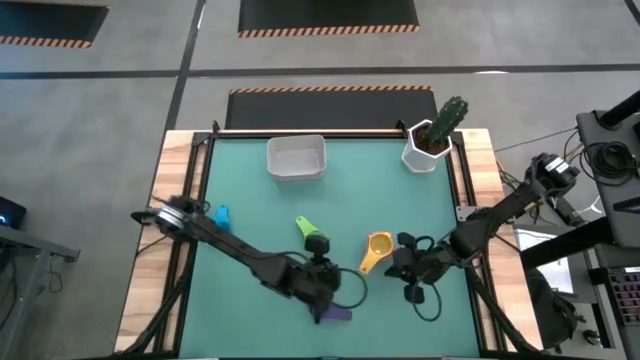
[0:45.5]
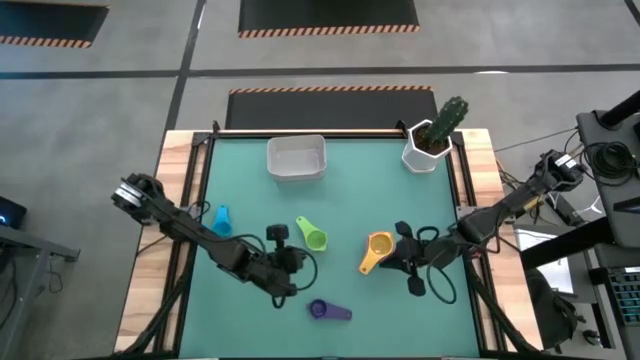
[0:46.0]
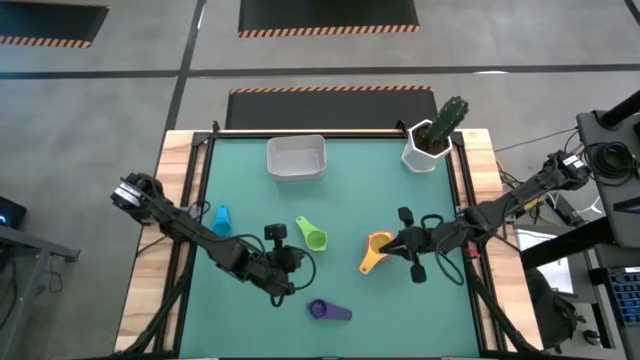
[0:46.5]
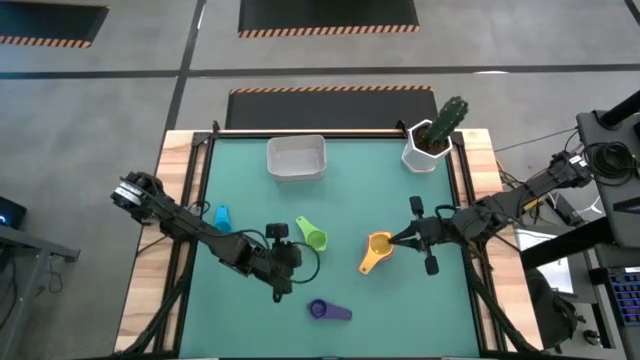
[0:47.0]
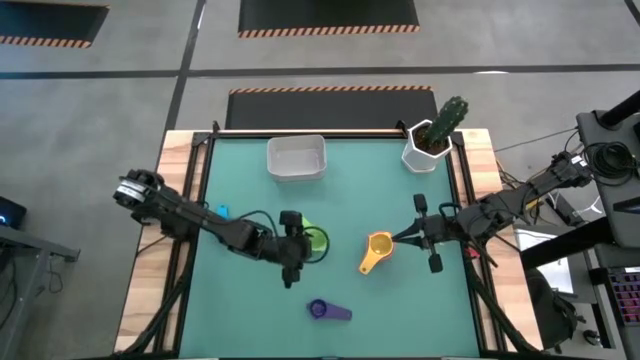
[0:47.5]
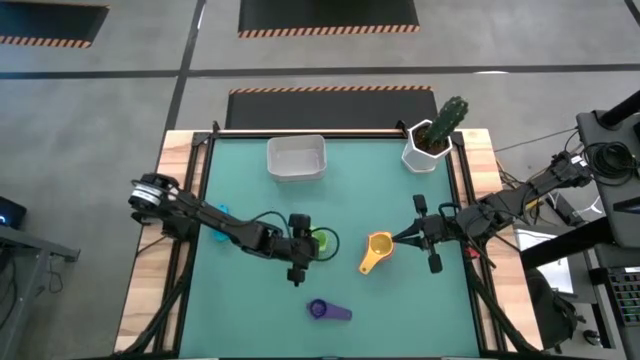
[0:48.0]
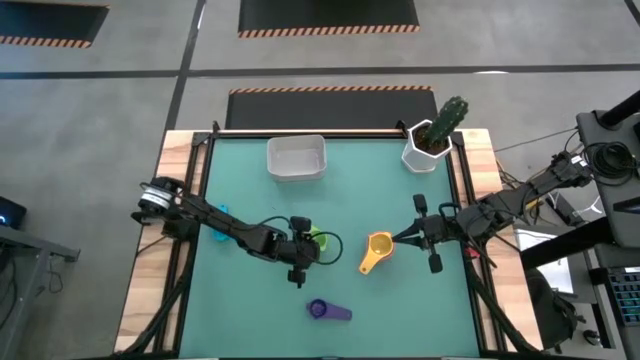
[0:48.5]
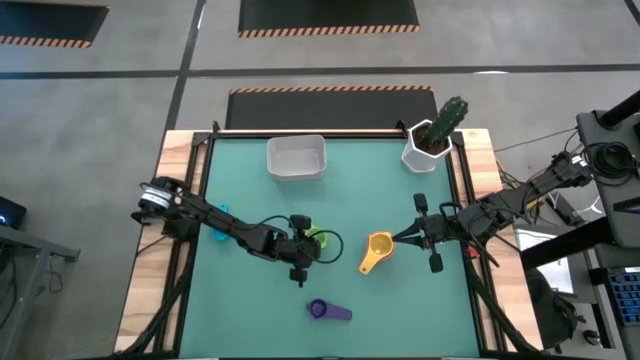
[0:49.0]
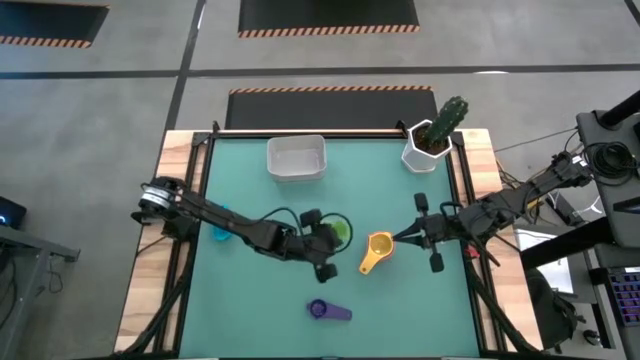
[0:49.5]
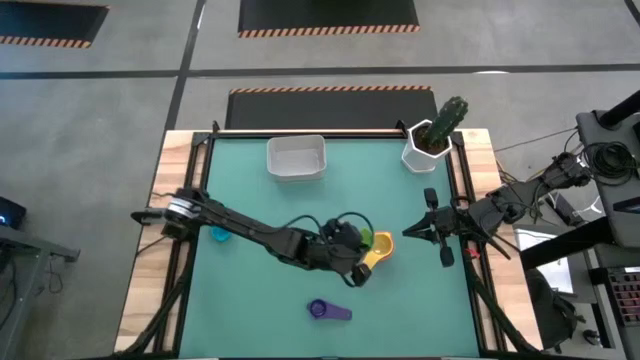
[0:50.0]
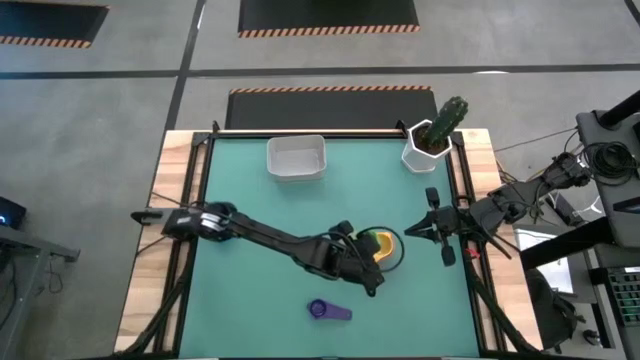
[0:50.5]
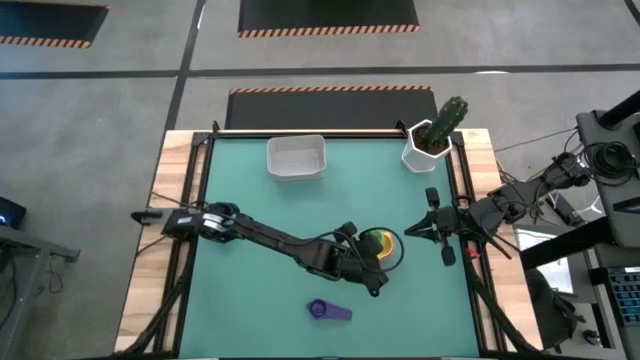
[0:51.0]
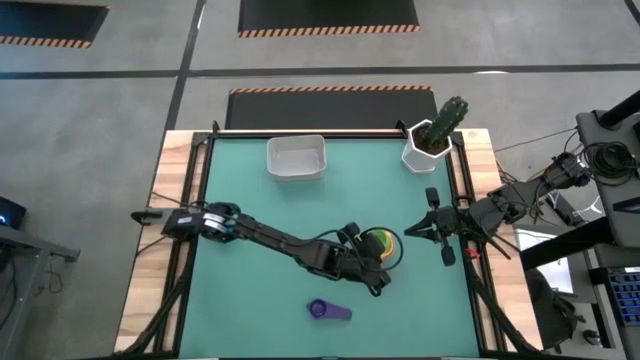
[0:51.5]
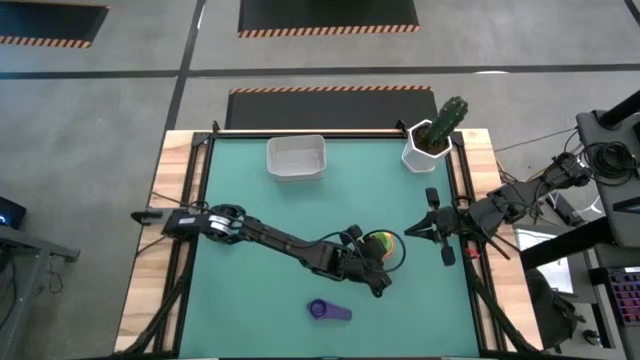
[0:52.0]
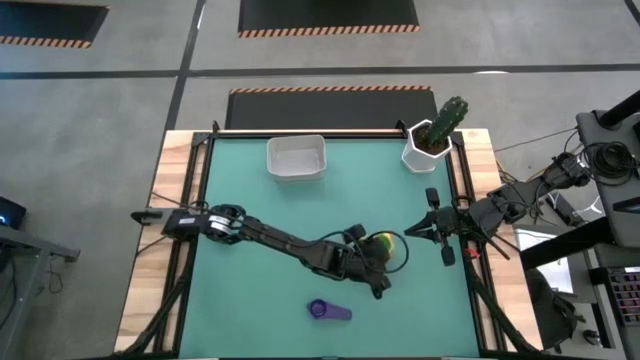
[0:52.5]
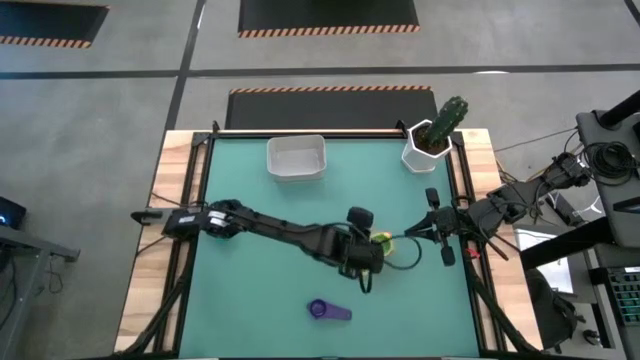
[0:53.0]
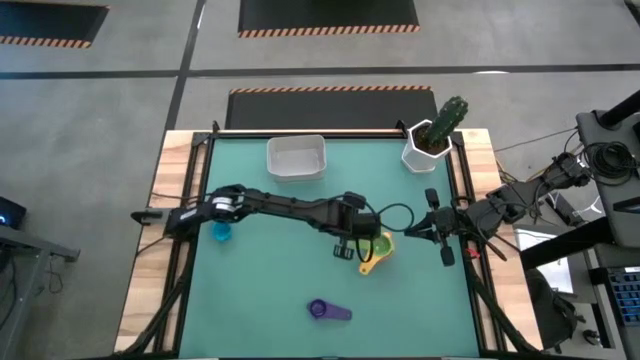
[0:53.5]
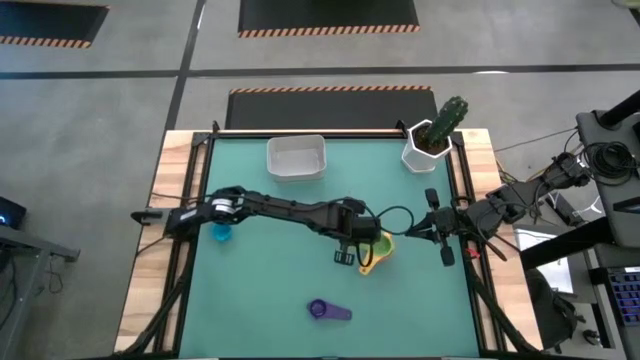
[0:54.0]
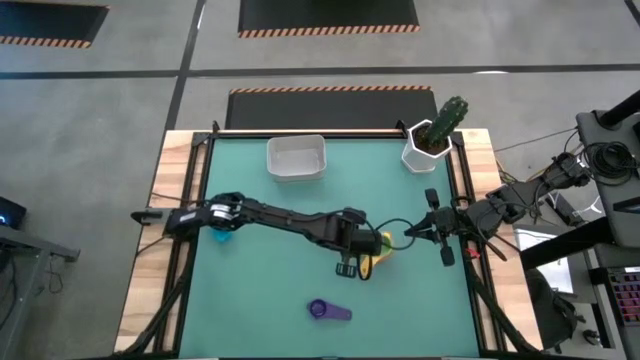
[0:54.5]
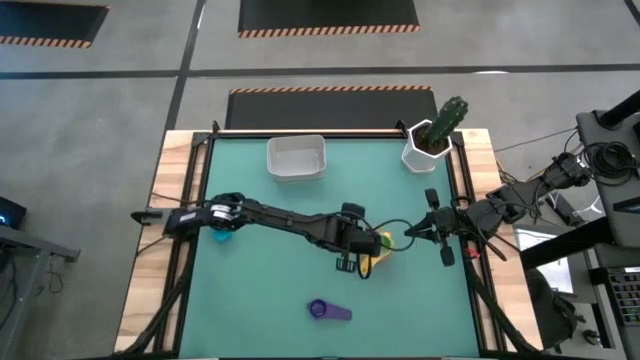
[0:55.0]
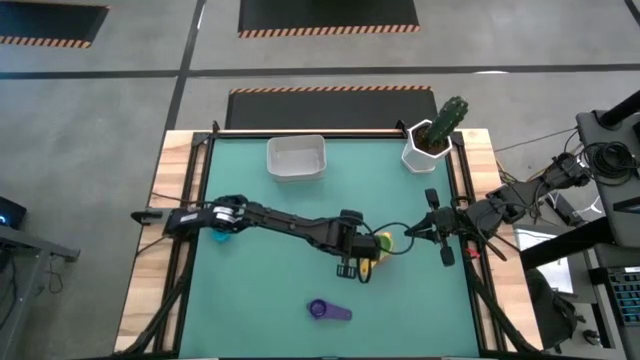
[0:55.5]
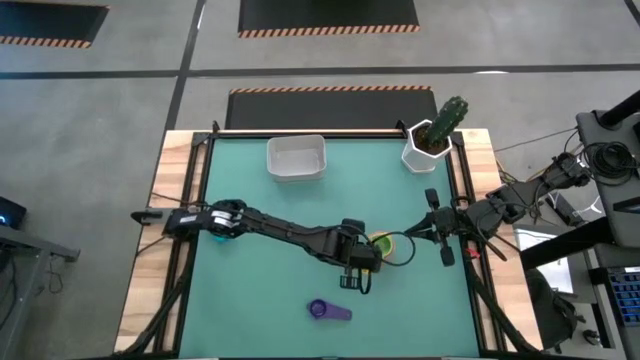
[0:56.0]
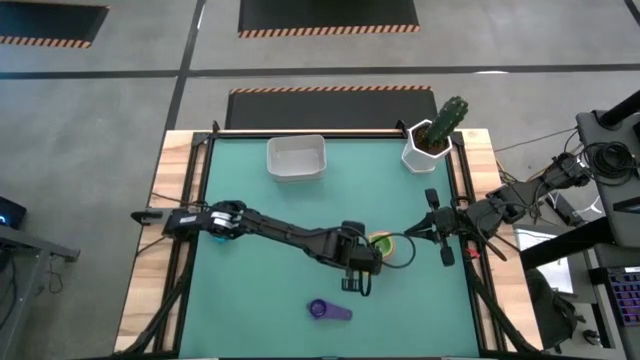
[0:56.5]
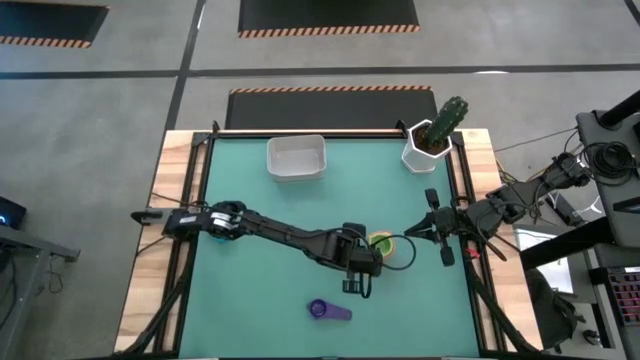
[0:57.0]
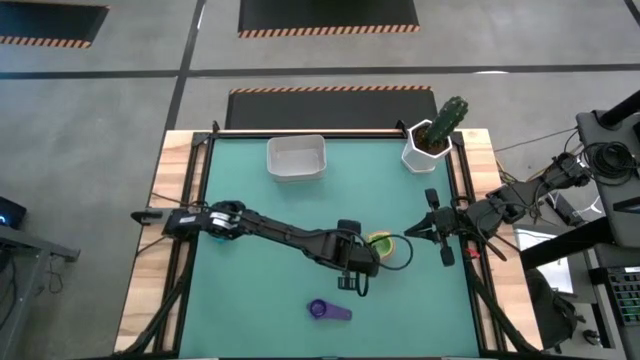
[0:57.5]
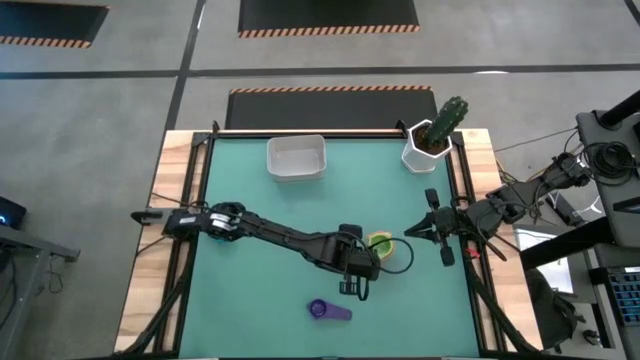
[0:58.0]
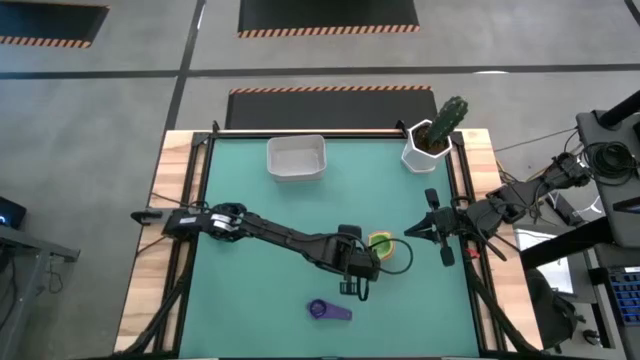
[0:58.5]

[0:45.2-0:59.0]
Task: Nest measuring cups in basket
Stack the green measuring cup on top of the yellow measuring cup

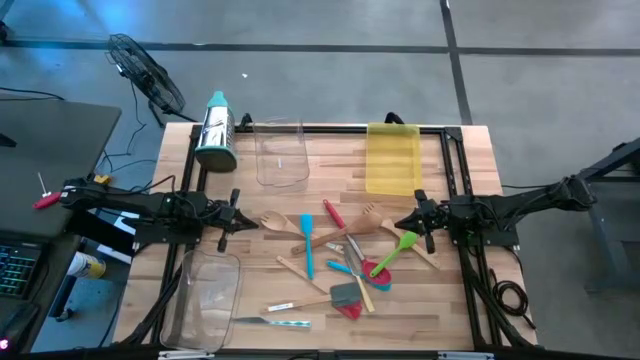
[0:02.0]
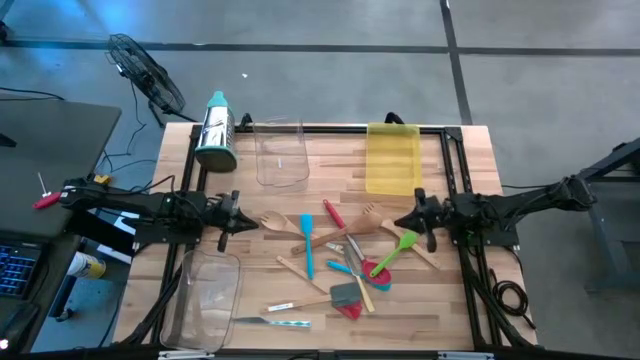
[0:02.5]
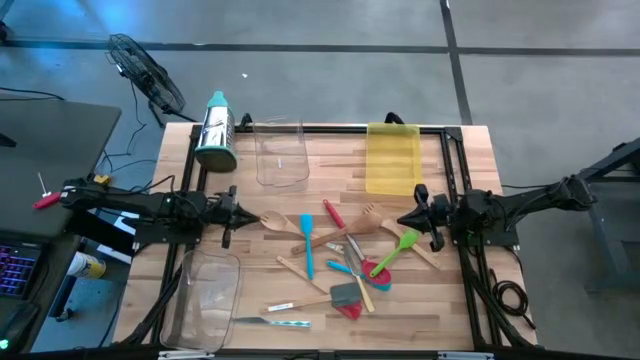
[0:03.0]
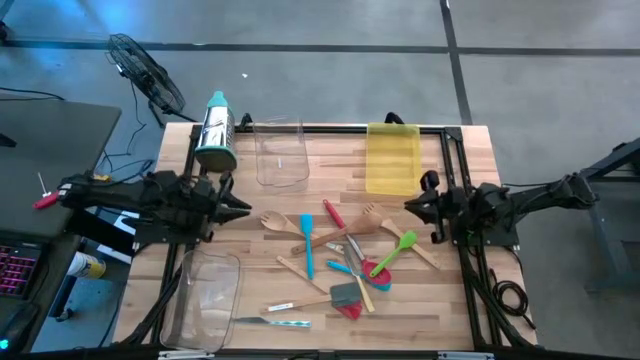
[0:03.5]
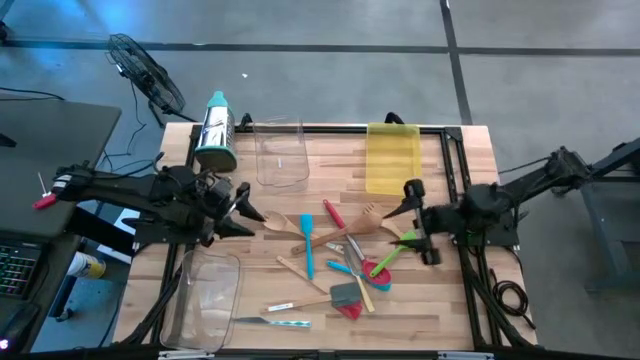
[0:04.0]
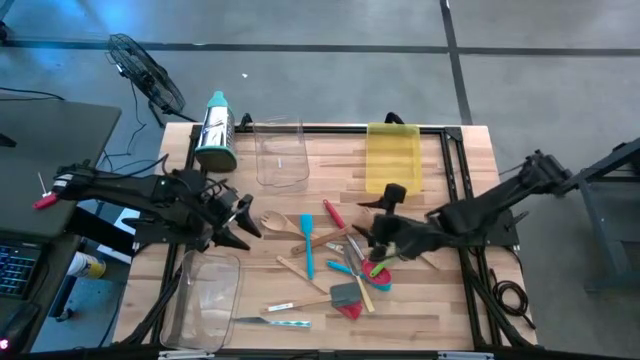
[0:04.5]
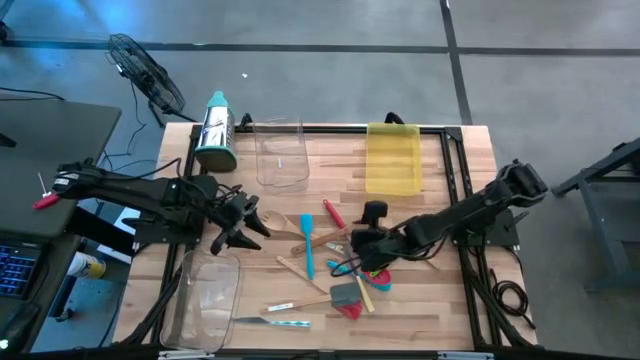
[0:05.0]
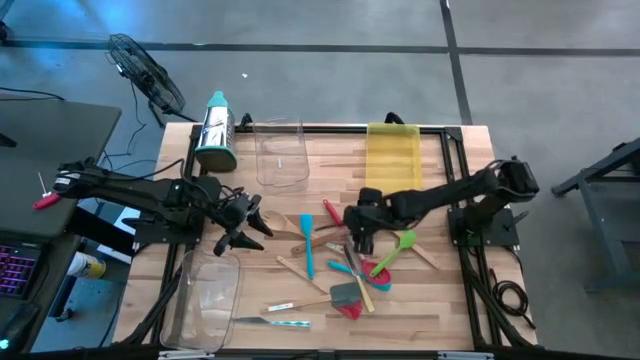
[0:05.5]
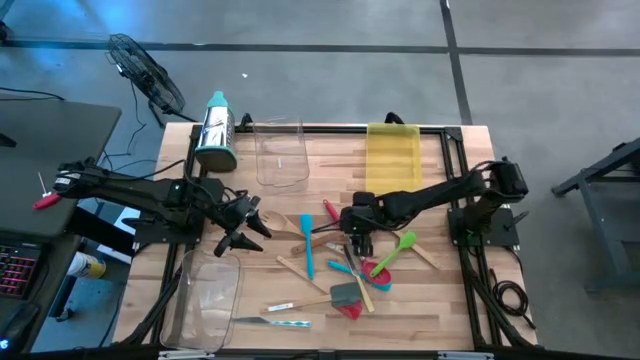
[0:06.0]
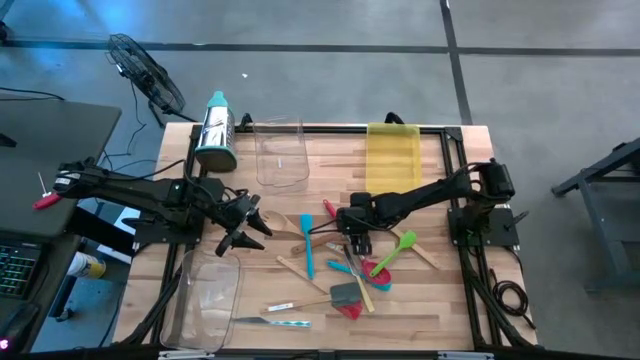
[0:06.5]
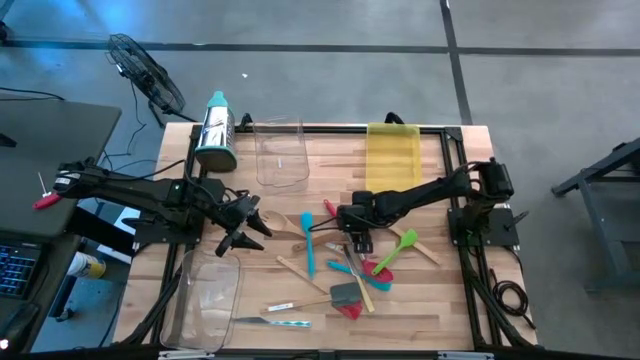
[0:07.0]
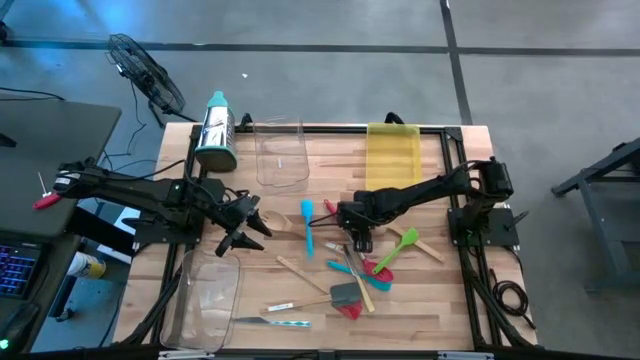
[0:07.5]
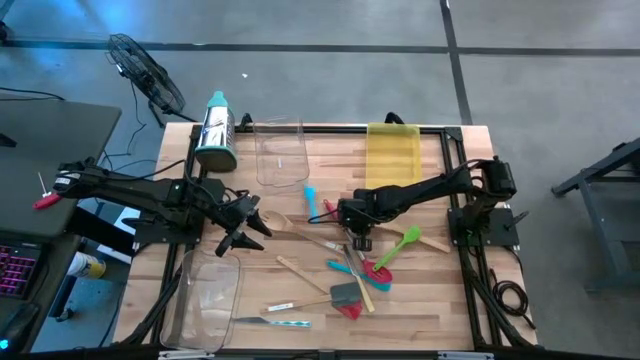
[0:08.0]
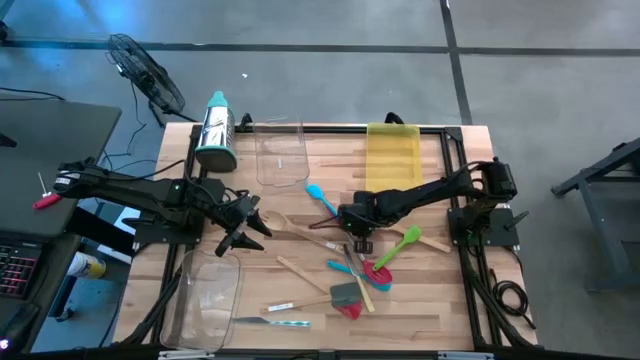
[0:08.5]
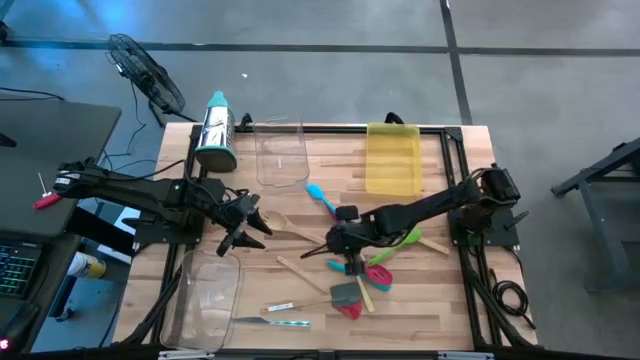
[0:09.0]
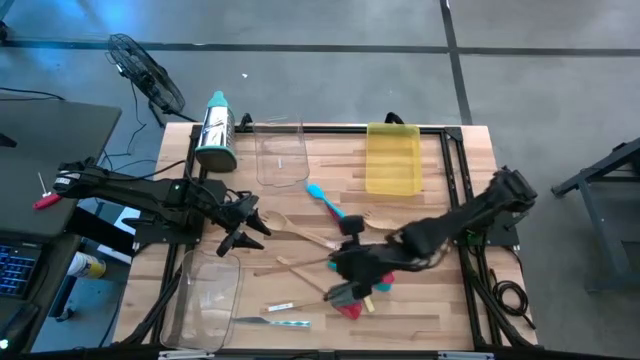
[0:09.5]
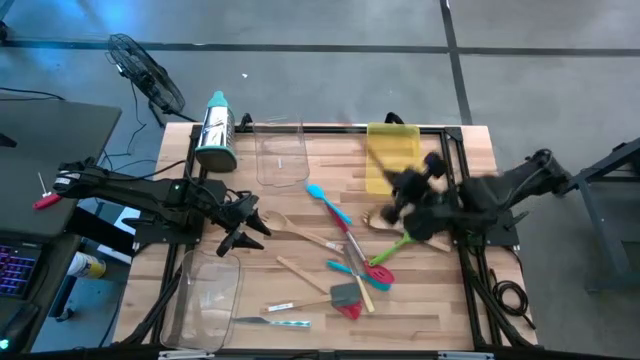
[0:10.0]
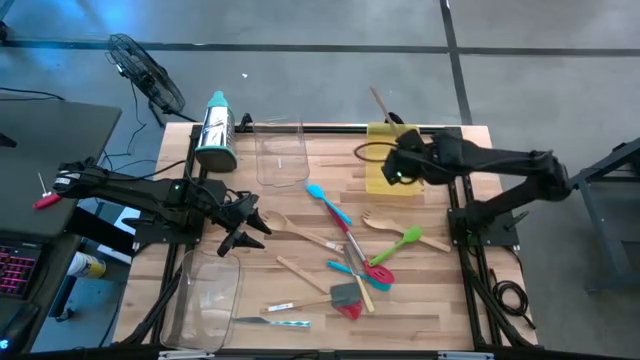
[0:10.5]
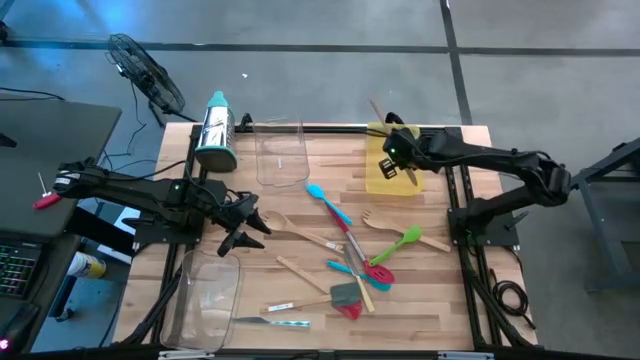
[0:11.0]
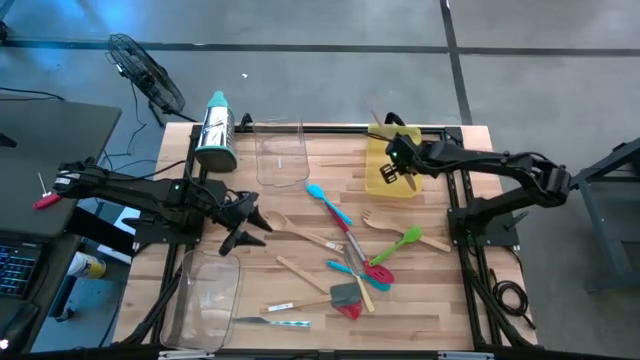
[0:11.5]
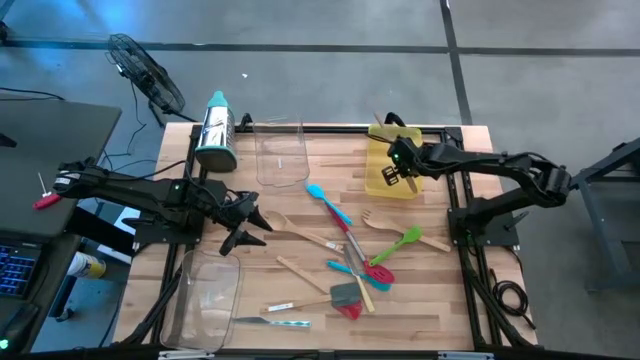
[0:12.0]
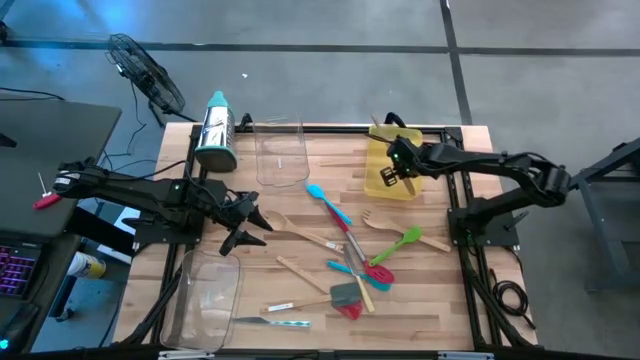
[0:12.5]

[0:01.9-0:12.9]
Task: Pick & Place Kitchen Items
Put the brown wooden serving spoon into the yellow bin
